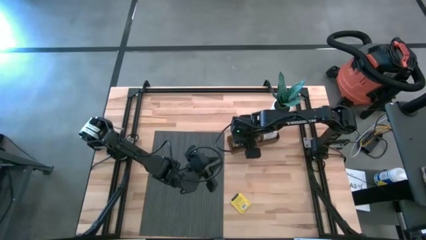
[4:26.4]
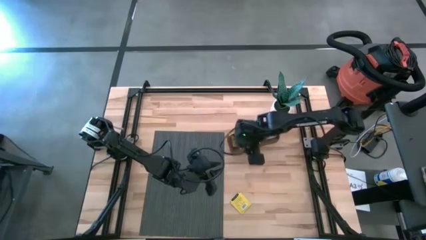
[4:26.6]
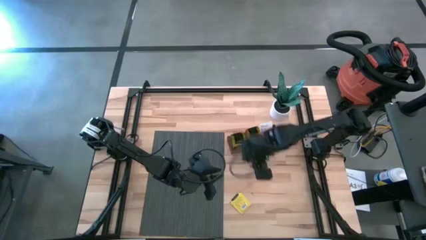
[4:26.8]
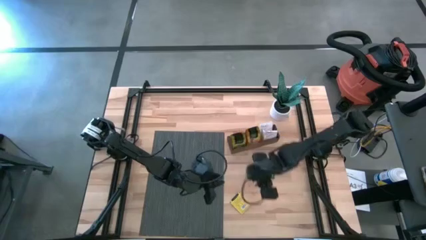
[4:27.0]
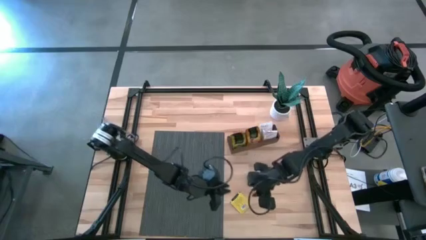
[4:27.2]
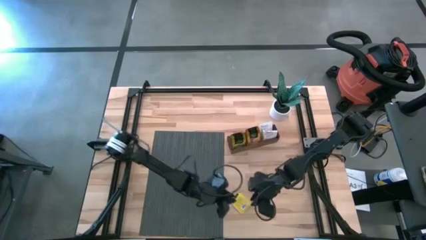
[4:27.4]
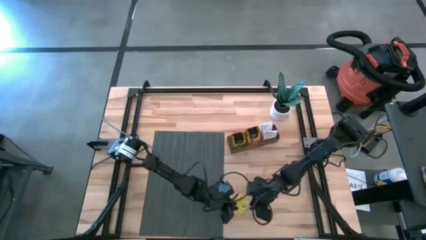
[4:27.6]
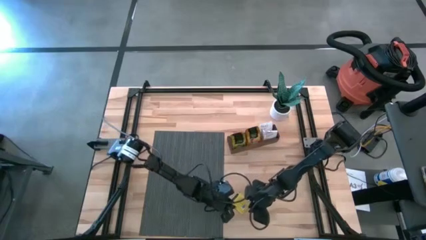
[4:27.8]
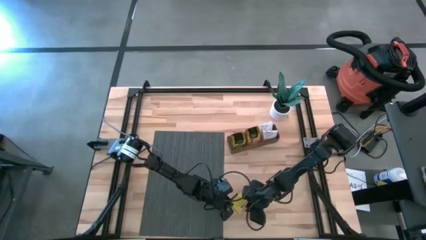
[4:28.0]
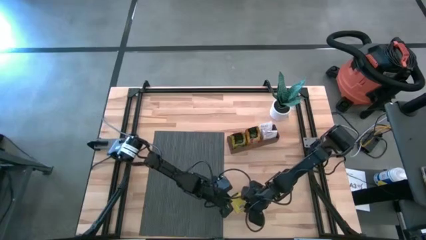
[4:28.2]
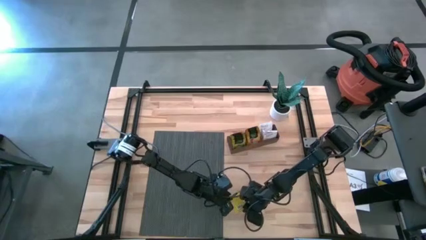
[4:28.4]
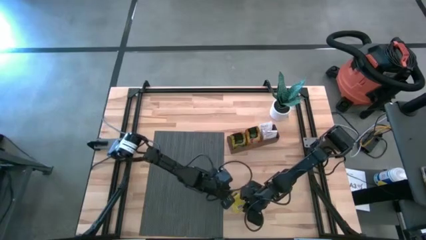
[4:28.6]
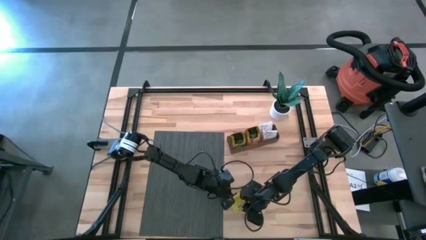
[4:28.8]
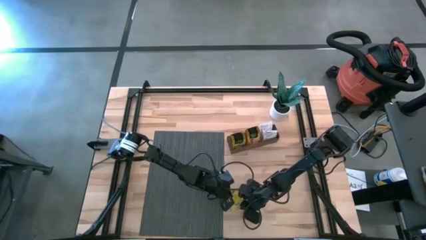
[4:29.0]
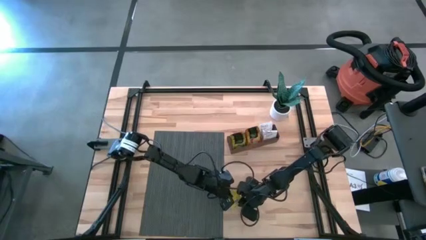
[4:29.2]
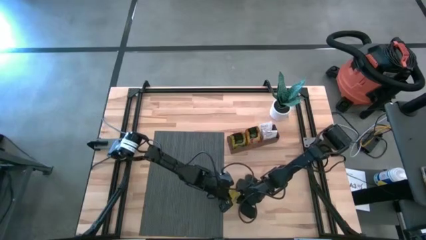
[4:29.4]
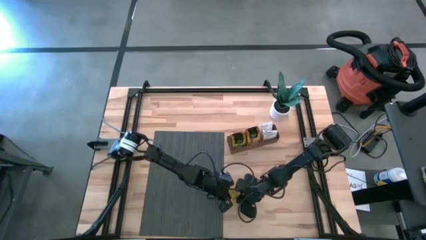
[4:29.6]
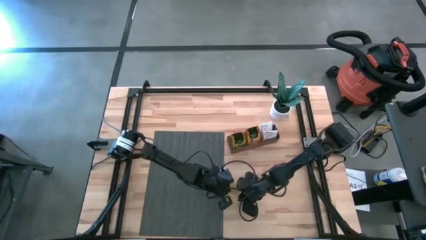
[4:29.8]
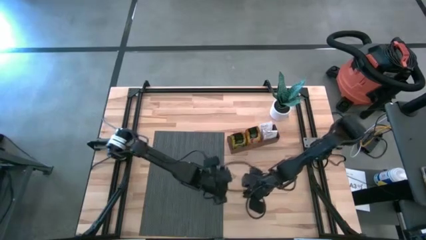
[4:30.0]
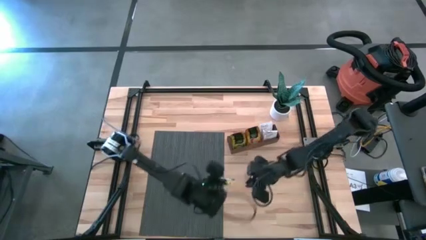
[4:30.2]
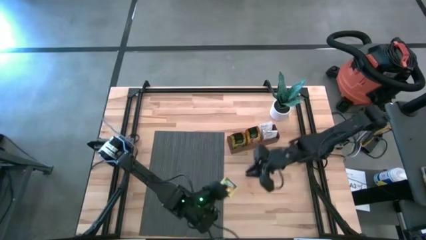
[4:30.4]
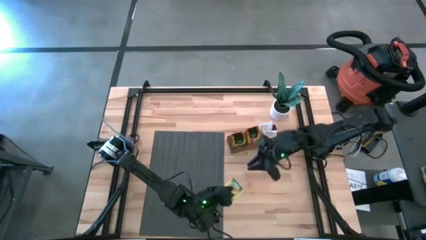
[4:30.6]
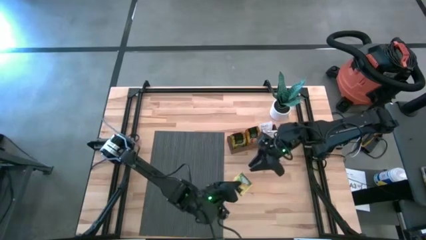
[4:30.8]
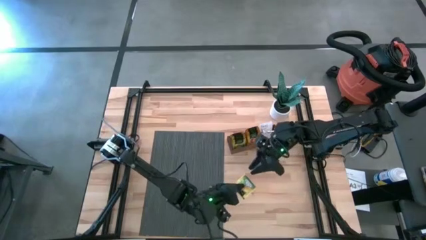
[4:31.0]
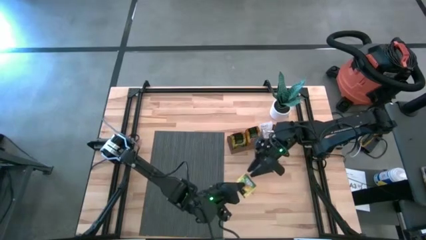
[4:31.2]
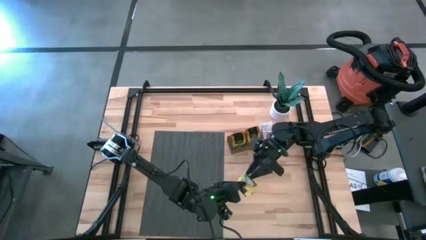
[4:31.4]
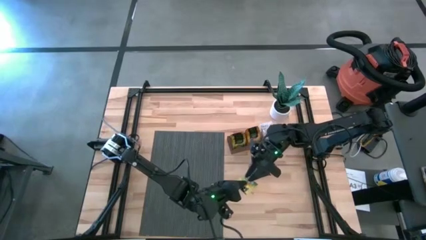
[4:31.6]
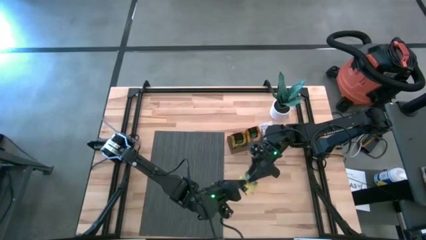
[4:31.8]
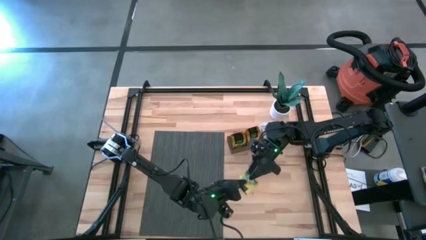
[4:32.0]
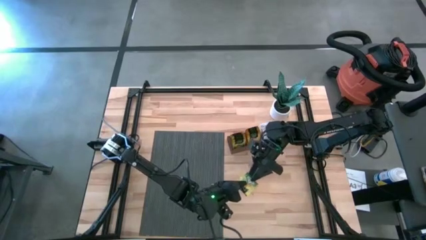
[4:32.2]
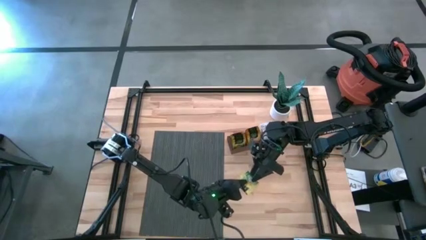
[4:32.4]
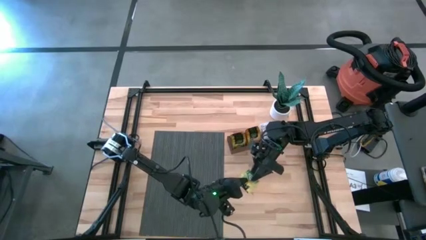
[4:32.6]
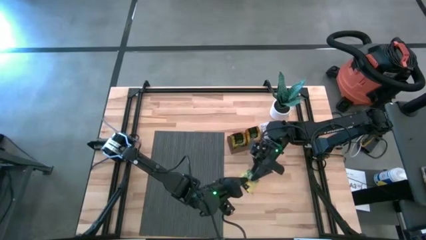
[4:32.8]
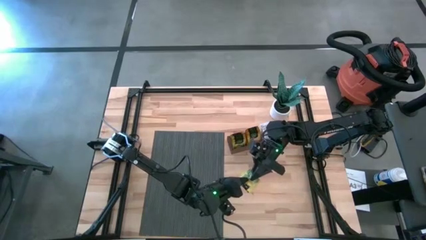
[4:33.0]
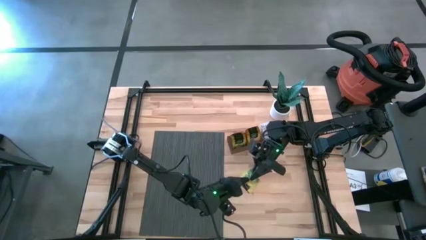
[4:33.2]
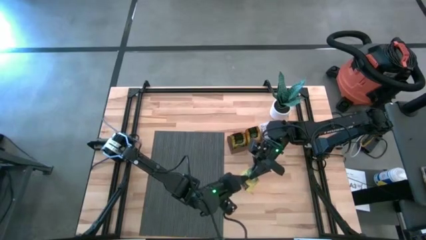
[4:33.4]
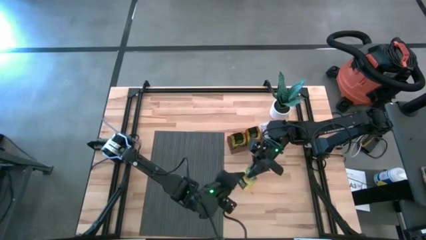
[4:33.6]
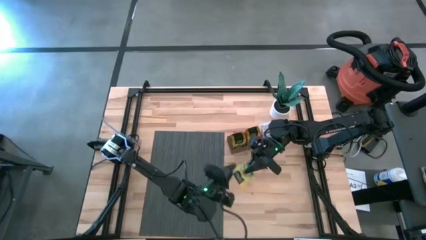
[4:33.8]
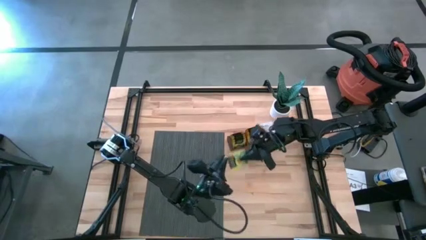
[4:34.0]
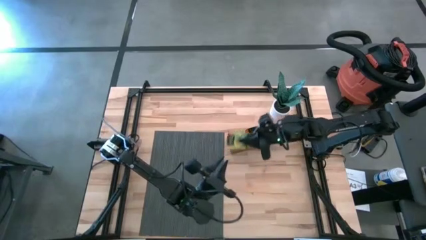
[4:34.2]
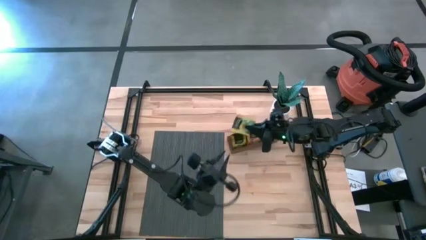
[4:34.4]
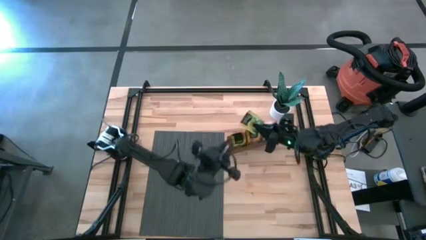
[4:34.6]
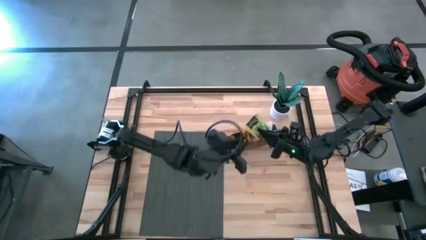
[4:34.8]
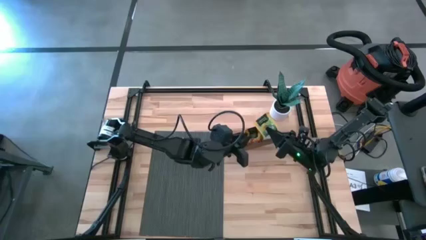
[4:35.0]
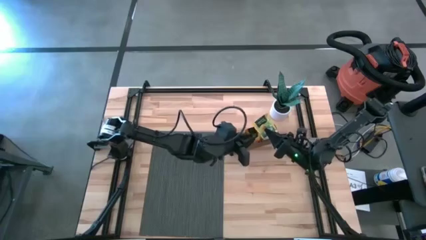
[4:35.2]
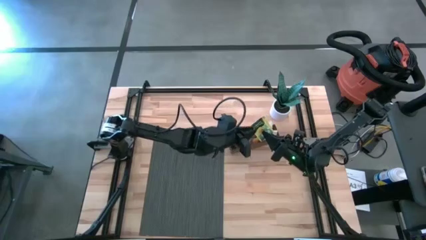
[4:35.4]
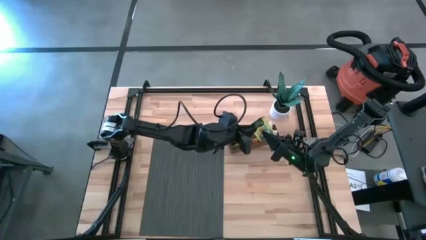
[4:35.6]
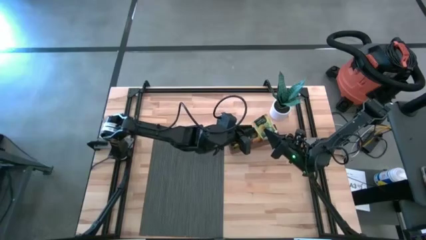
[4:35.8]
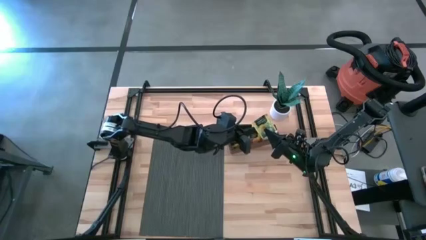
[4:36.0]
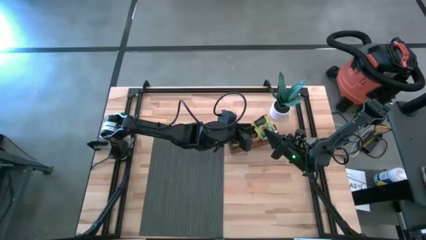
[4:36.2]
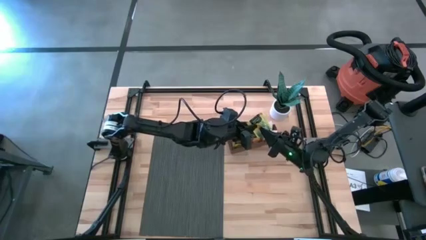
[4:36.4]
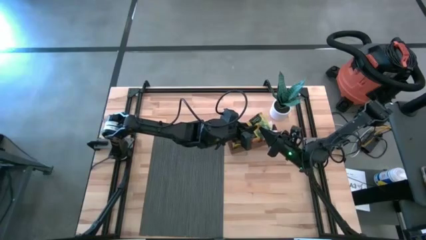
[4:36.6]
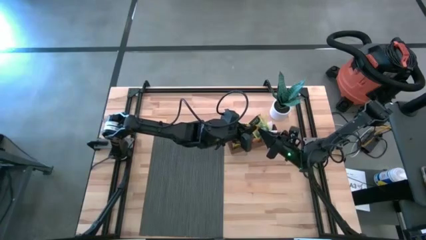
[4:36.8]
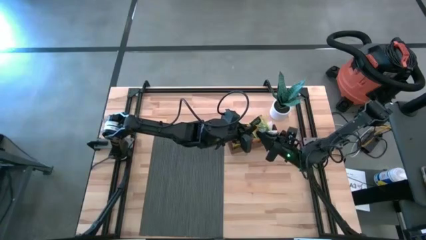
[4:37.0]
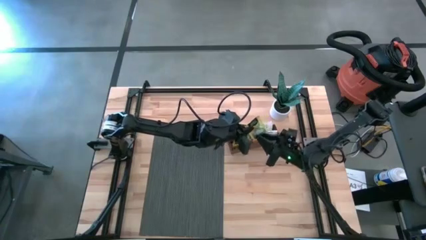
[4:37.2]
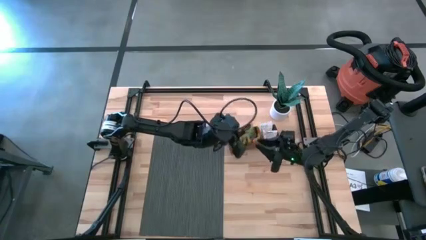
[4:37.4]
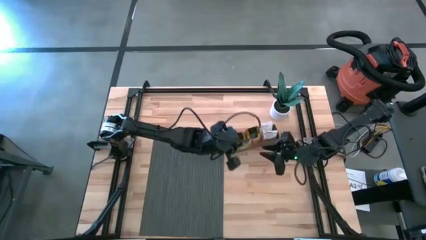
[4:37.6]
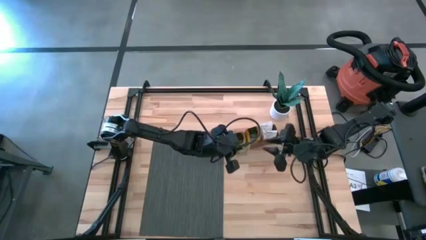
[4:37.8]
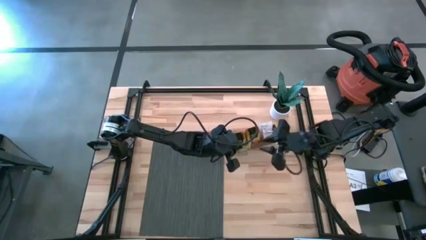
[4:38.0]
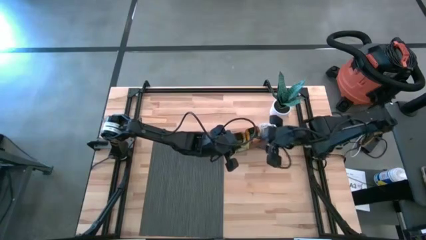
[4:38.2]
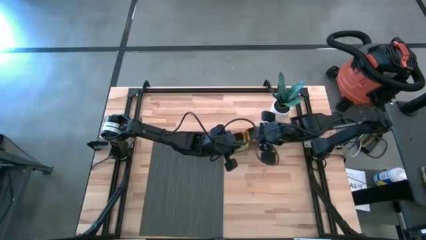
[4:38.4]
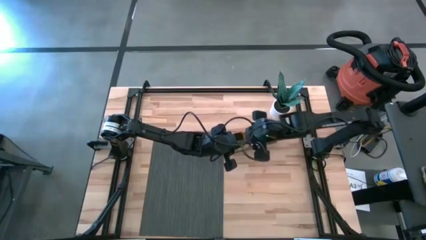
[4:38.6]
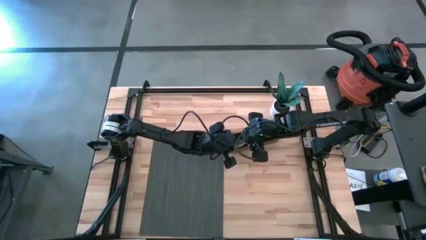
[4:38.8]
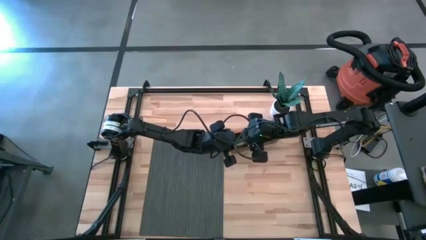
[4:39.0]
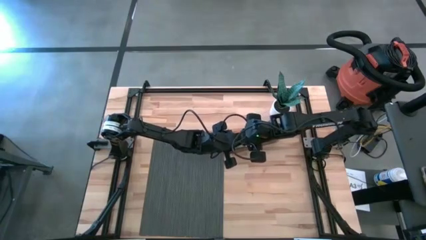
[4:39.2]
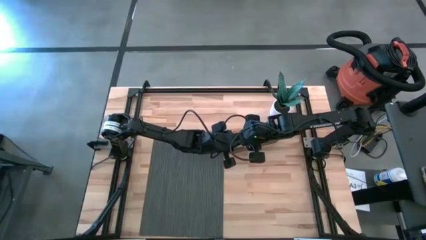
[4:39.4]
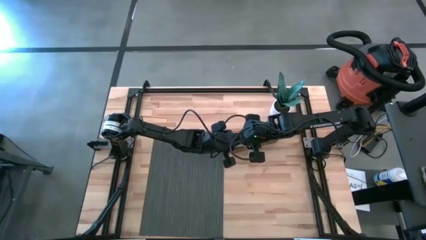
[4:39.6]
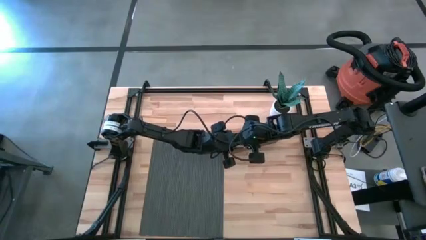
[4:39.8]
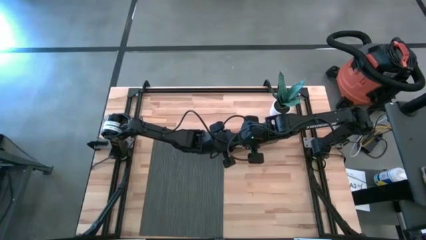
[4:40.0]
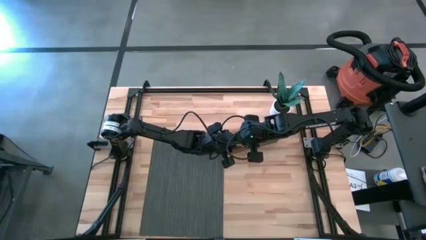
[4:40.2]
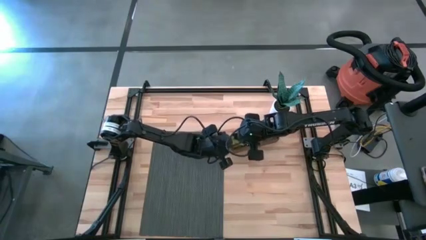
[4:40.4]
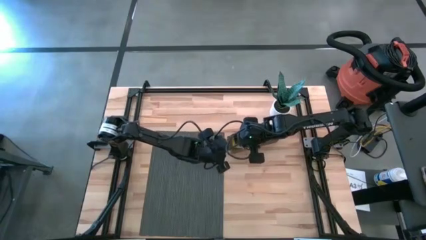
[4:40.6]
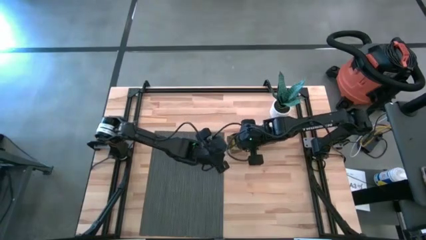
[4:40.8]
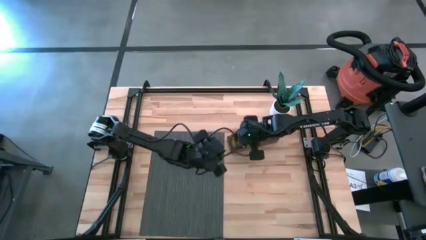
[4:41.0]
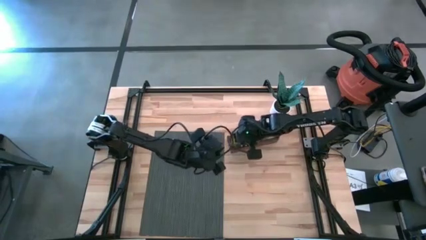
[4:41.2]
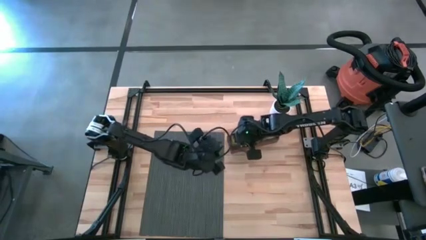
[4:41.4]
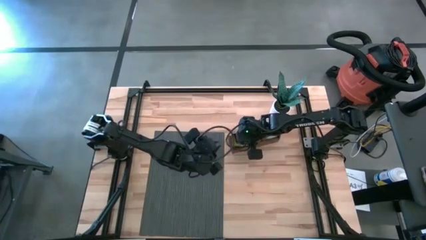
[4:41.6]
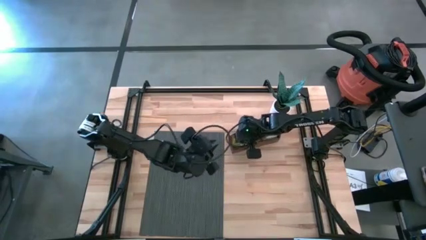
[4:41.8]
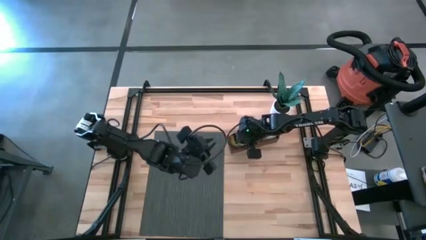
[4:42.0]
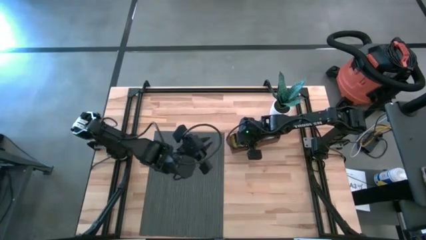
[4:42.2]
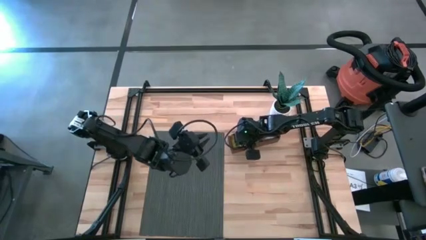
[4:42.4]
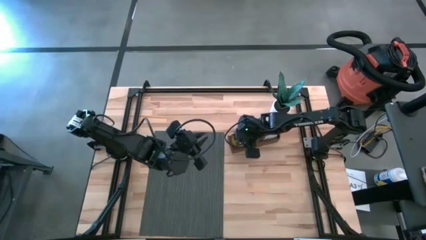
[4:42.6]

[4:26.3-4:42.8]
Task: Pick & Place Tea
Put the yellow tea bag into the middle section of the wooden organizer
